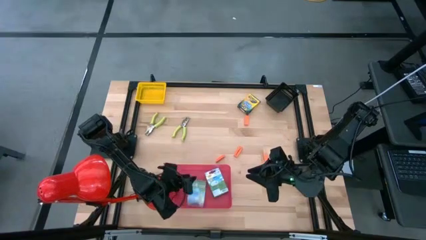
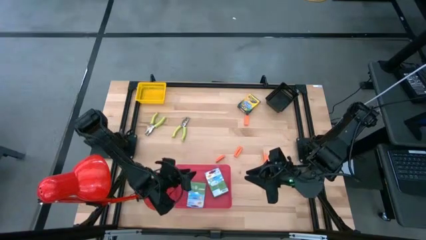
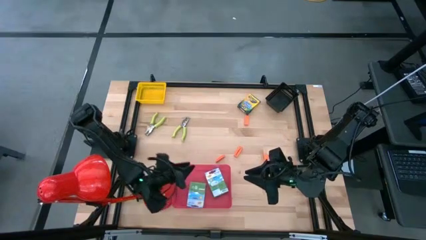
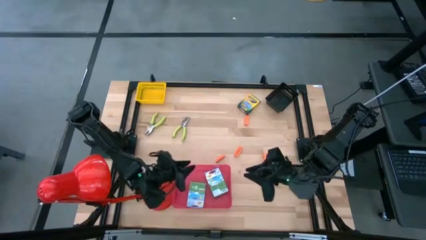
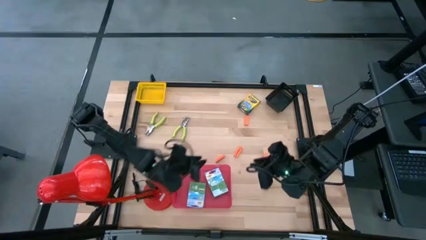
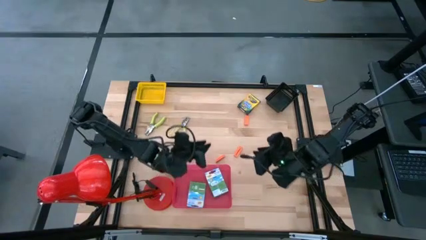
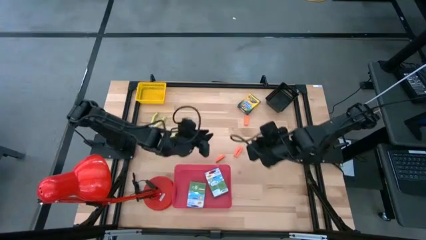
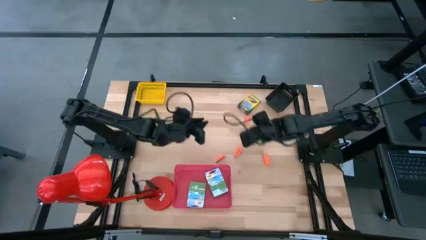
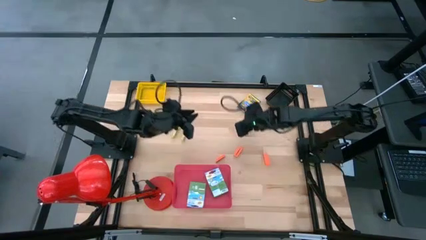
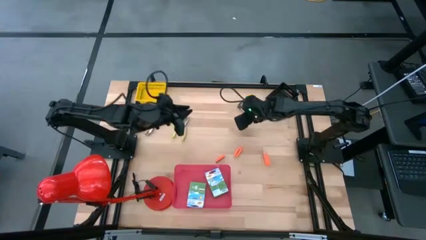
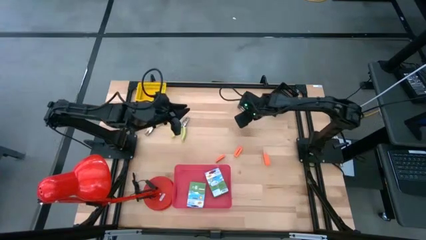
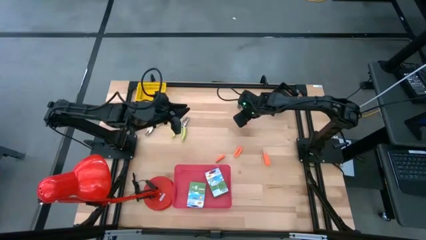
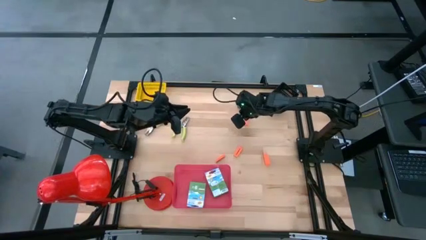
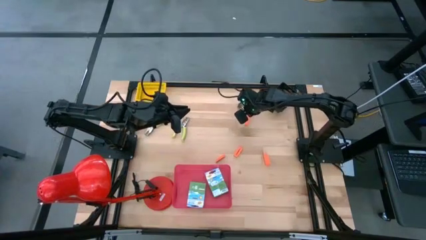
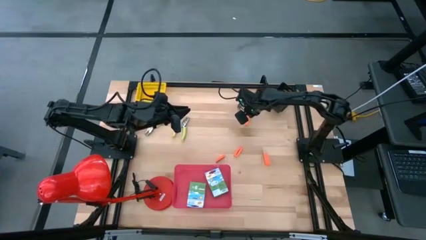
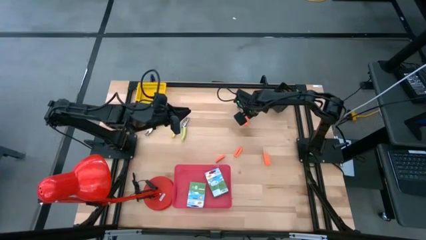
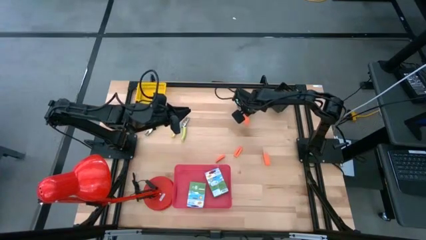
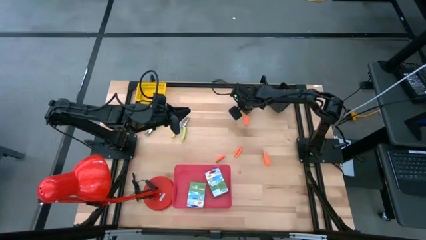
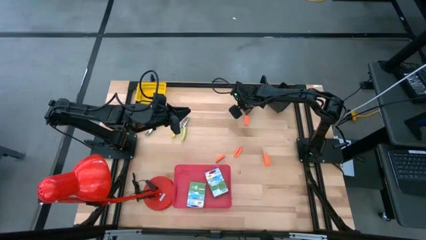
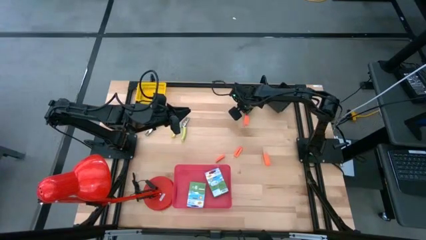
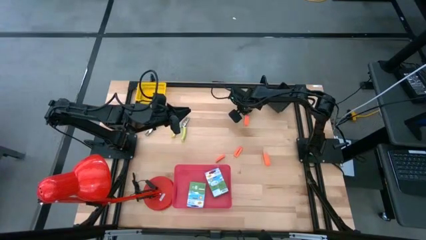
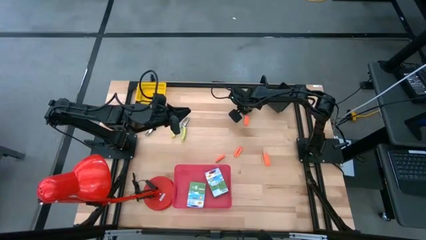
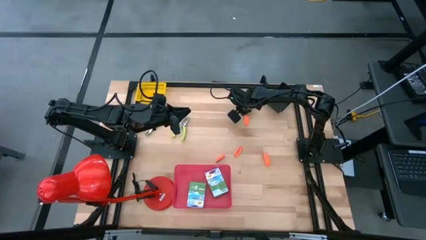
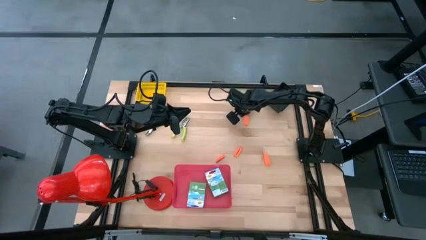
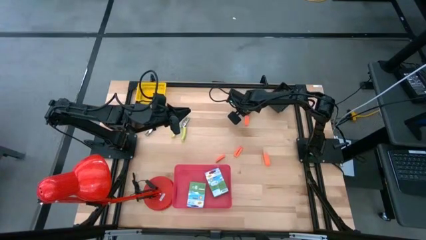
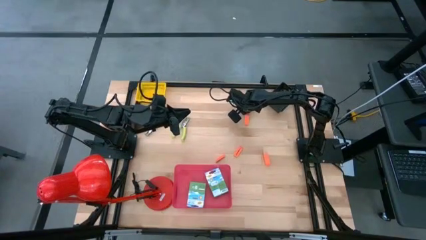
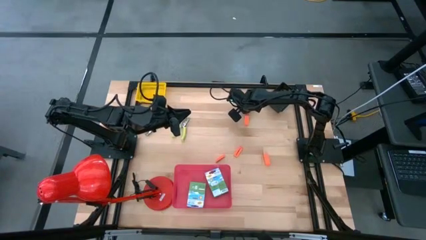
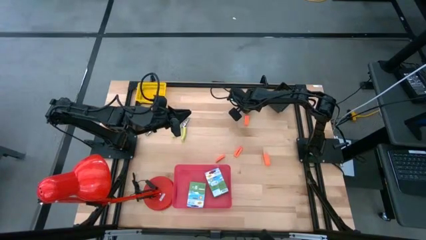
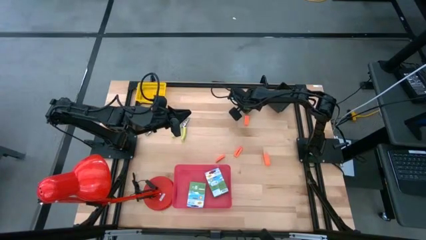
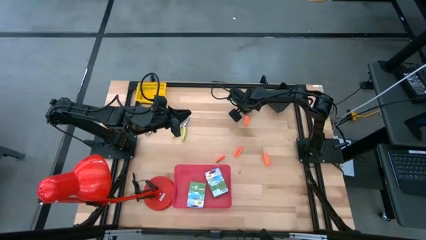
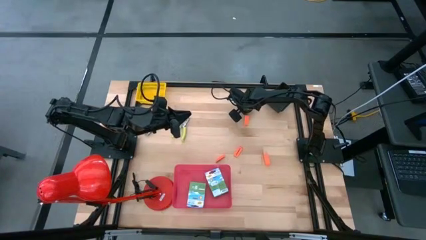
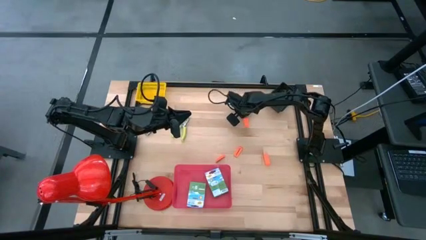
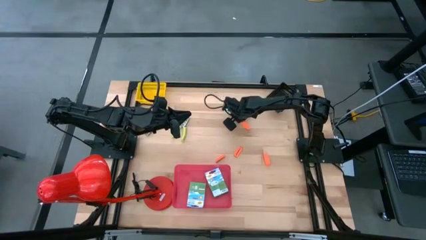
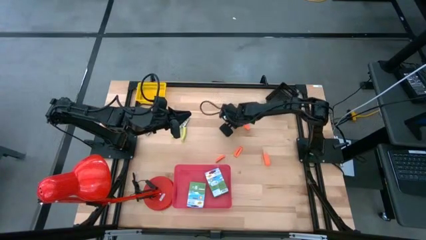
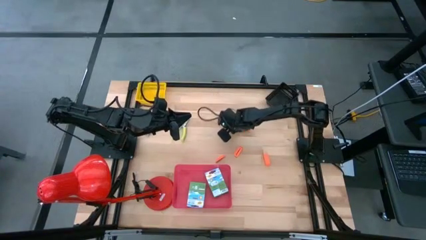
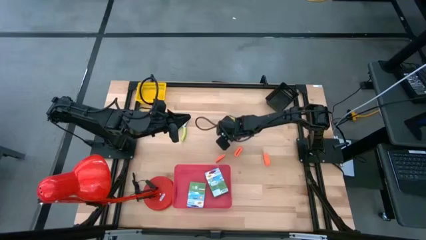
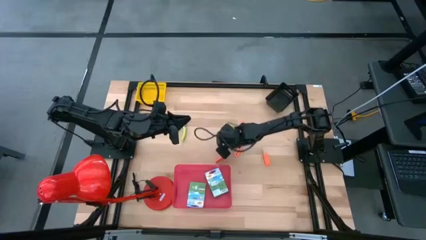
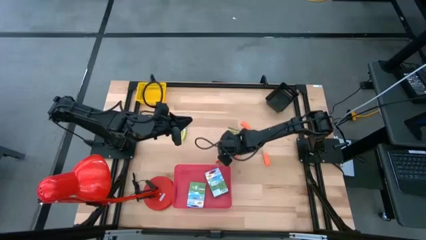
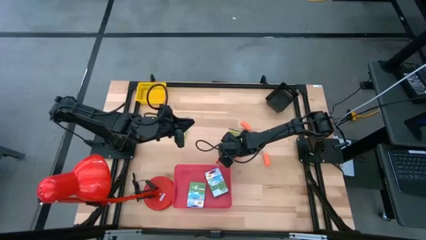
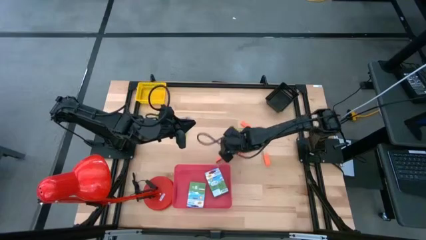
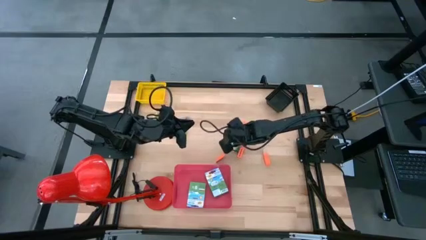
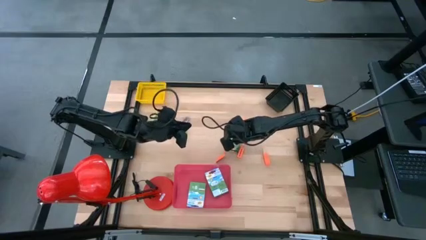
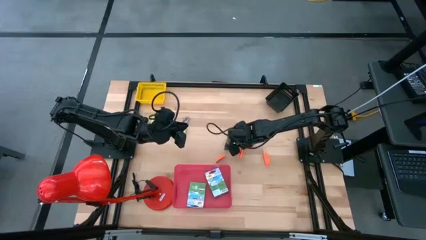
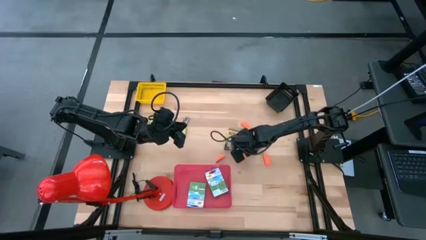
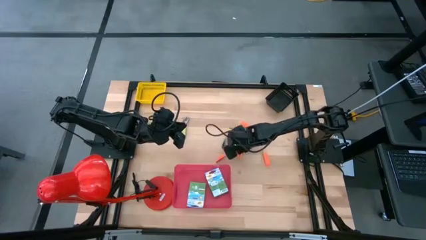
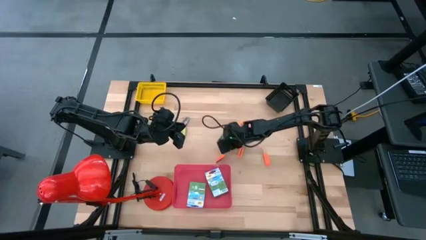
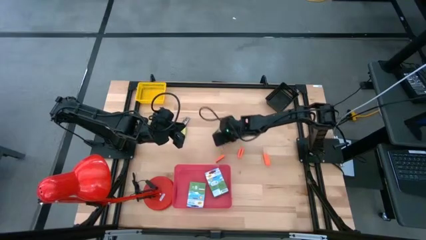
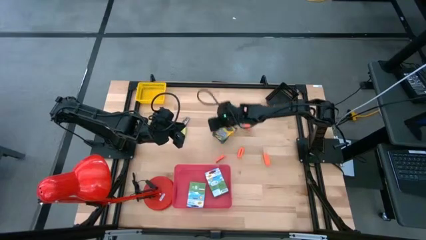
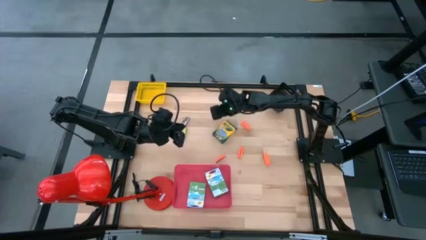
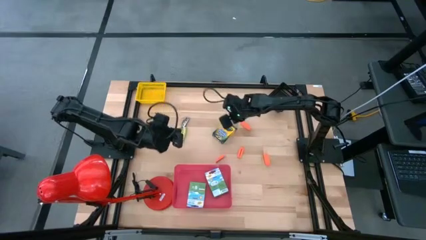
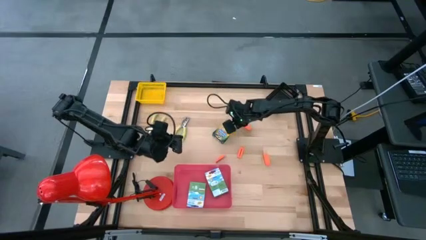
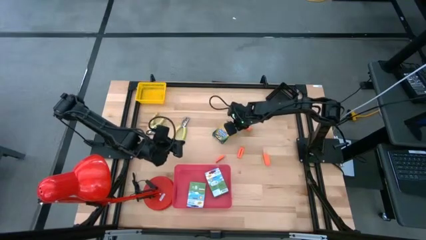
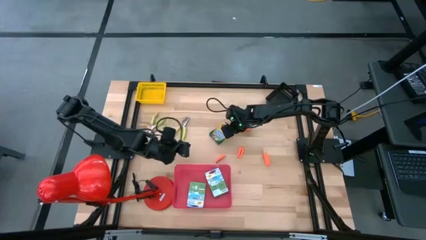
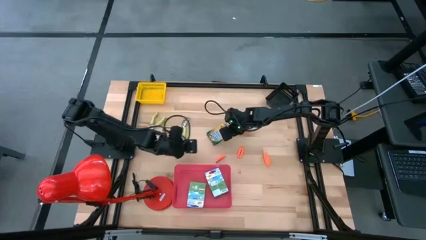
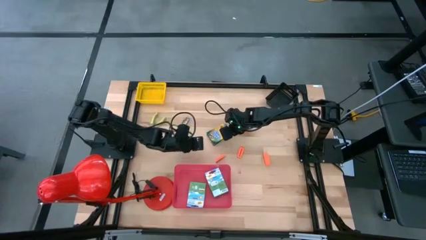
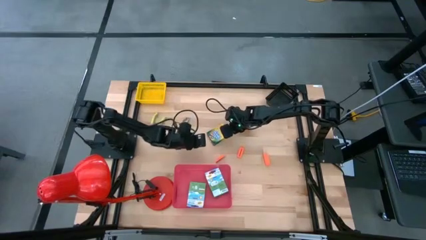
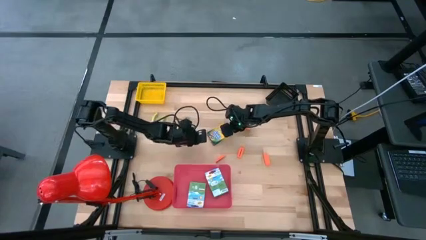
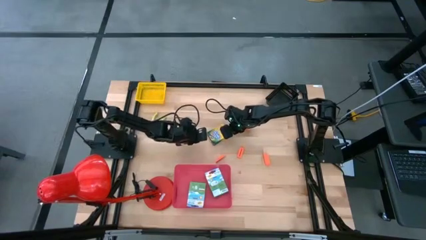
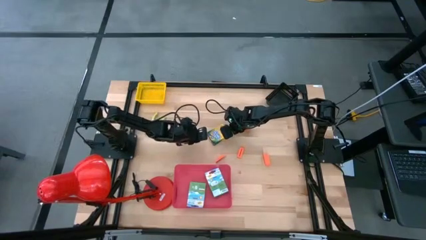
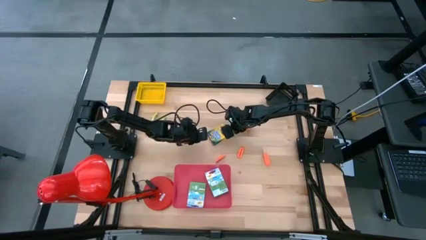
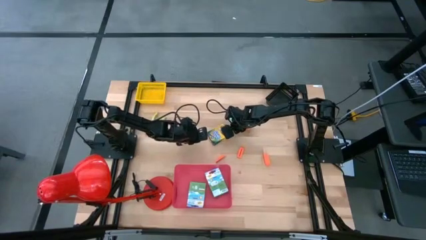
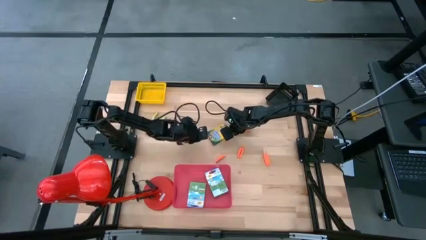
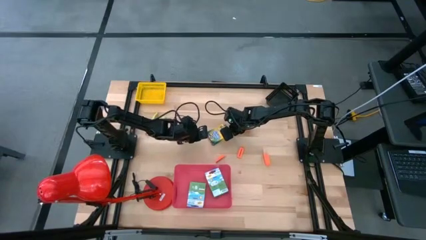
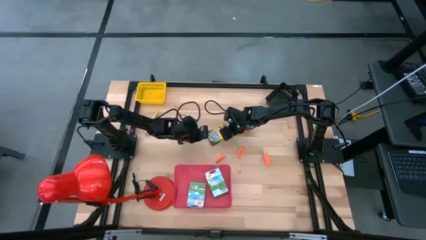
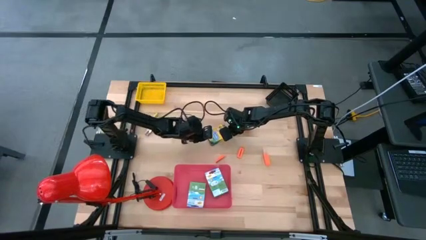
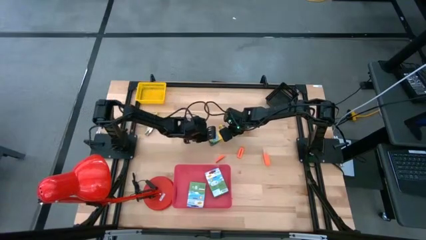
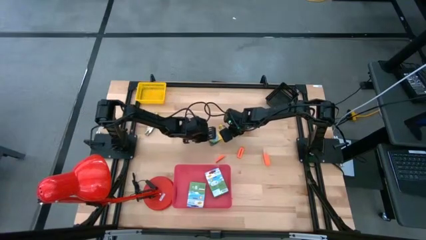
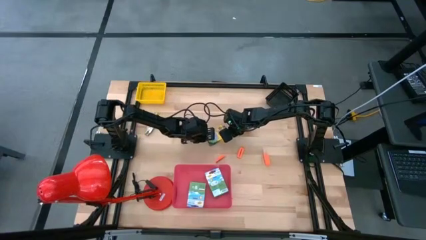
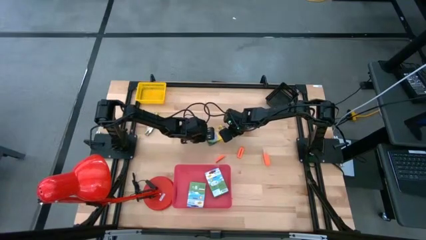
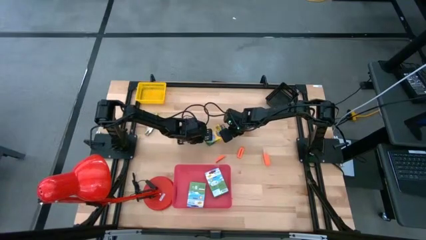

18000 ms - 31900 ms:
Task: Pick & Place School Supplies
Put the yellow crayon box into the pink bin

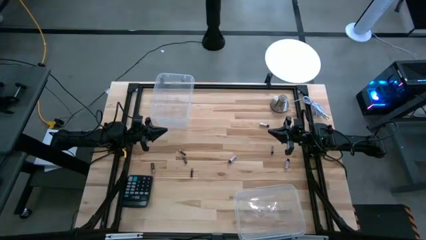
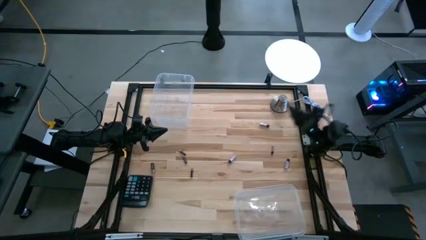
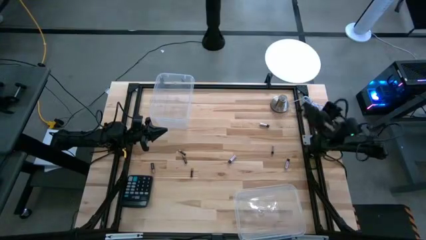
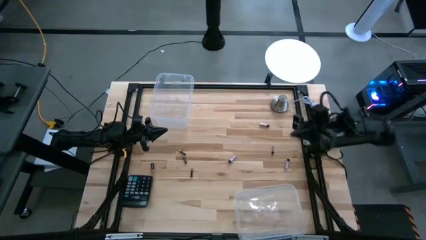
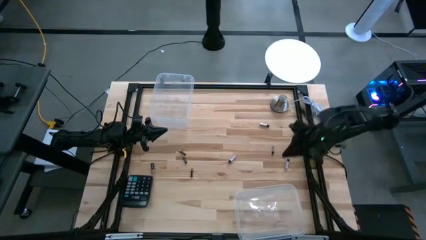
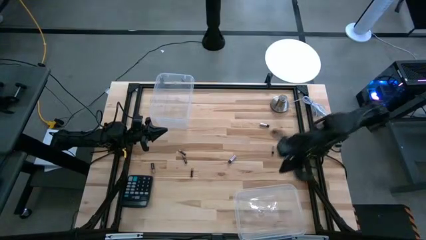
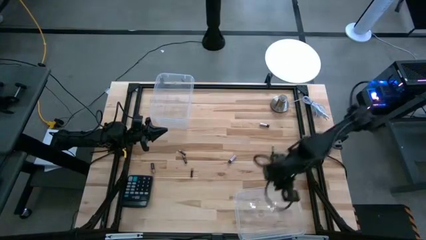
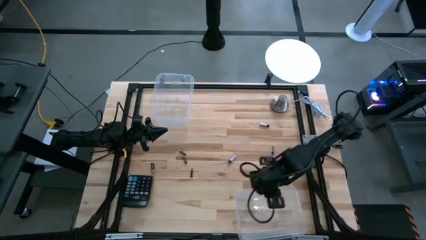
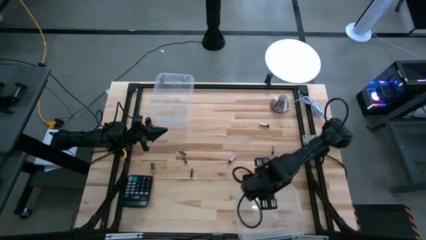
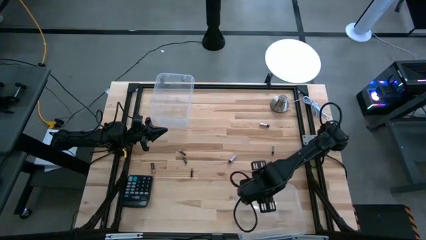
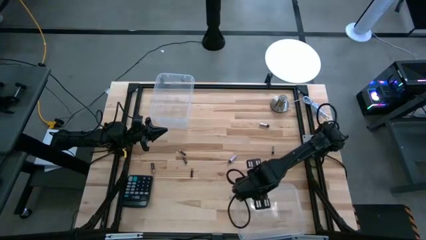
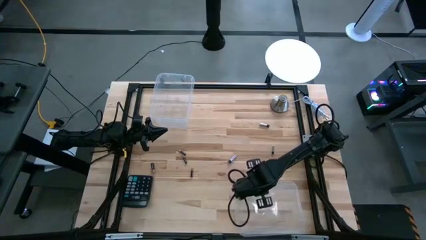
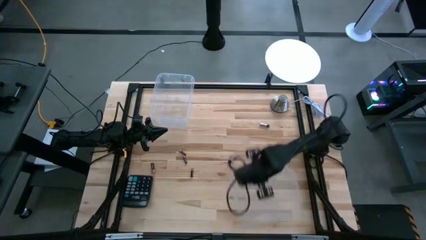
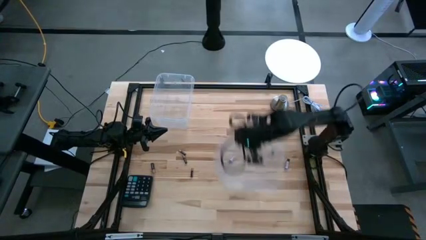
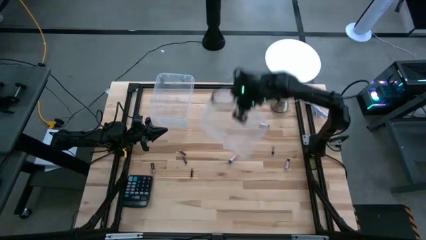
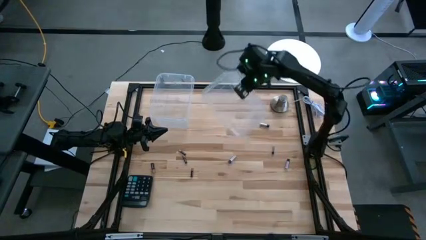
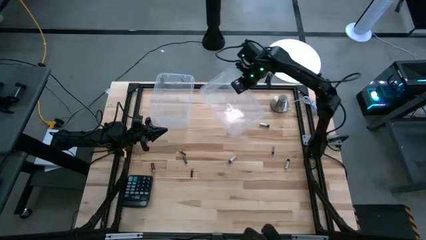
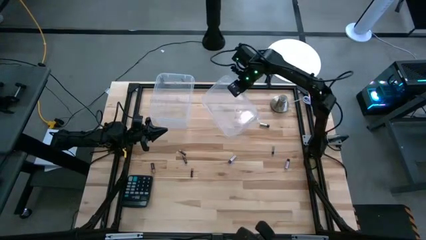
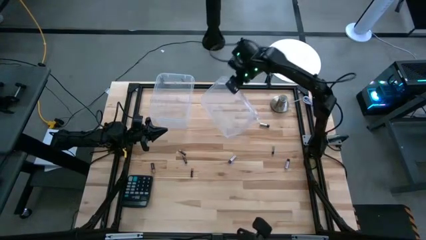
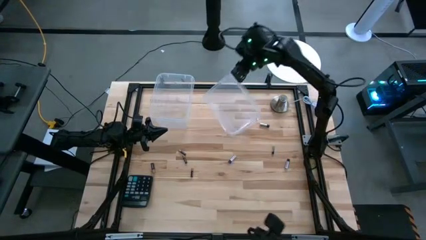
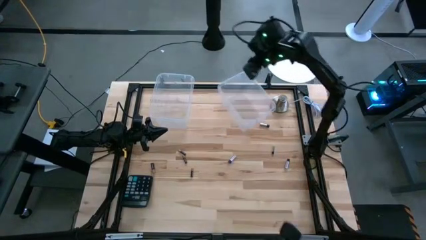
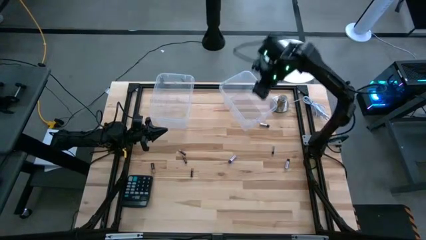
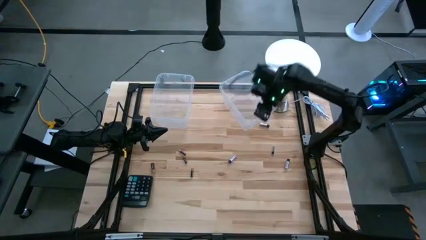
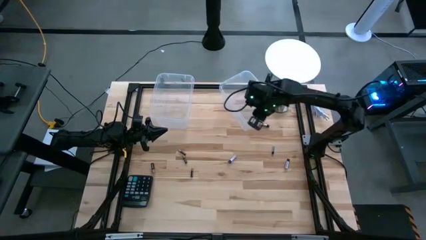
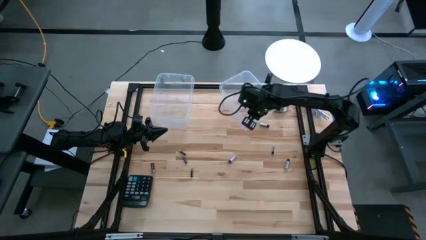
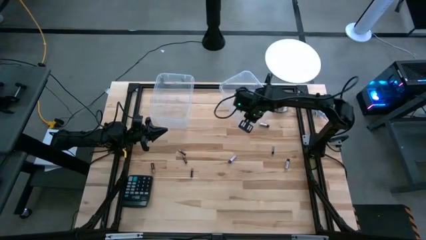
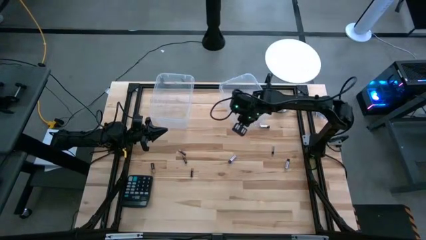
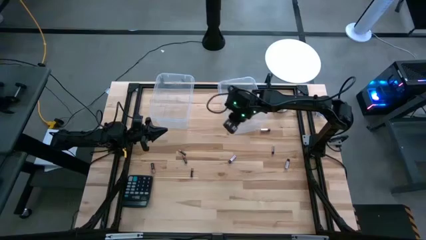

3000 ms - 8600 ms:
Task: Sort batteries
Move the bottom transparent bin to the top center of the table
